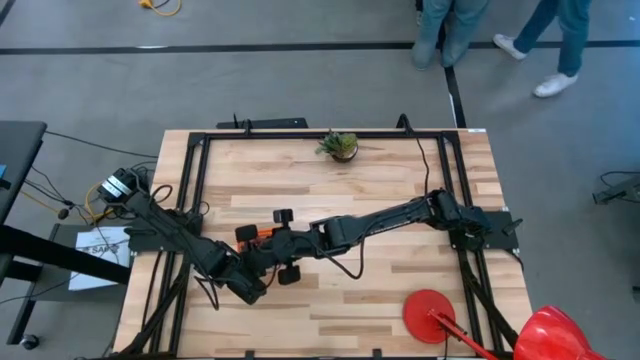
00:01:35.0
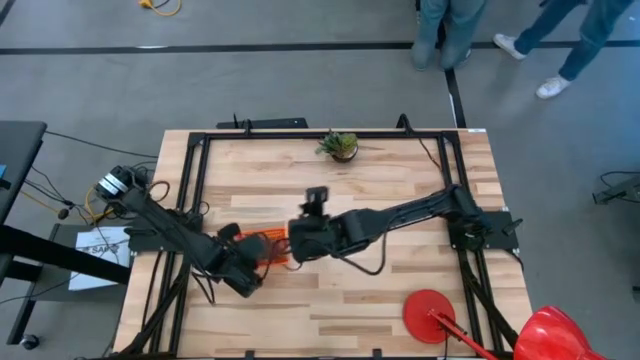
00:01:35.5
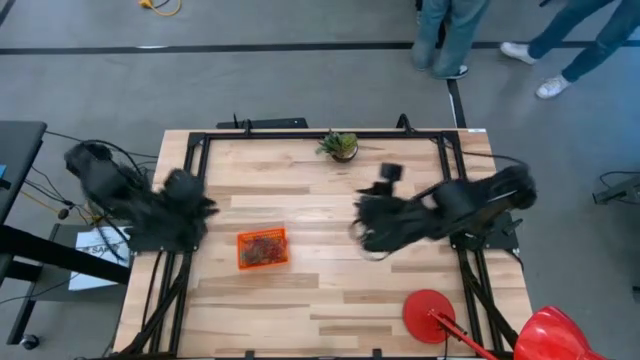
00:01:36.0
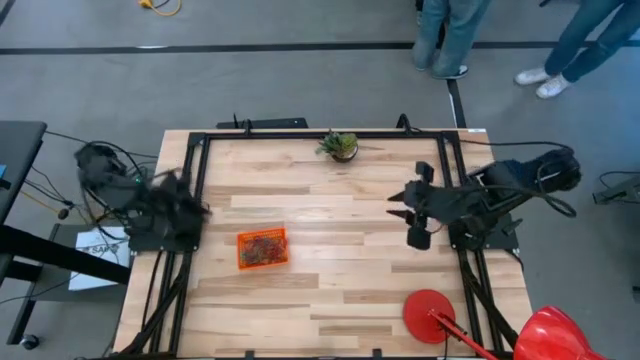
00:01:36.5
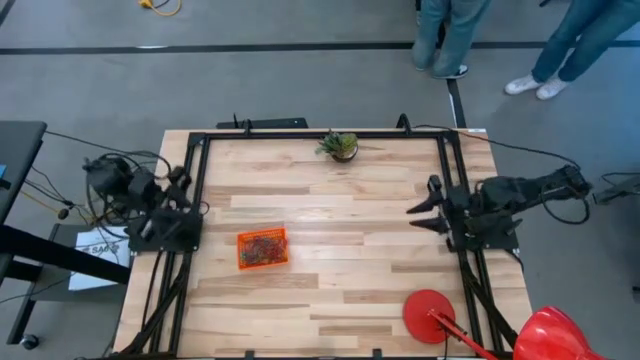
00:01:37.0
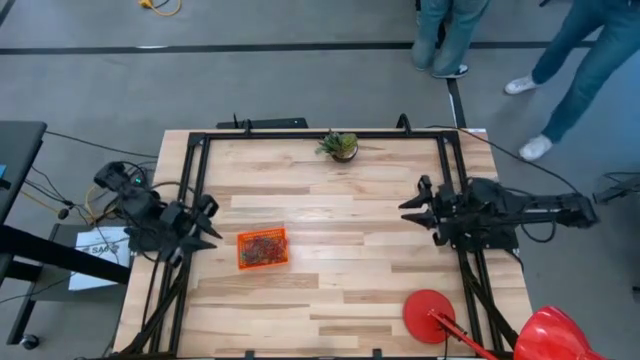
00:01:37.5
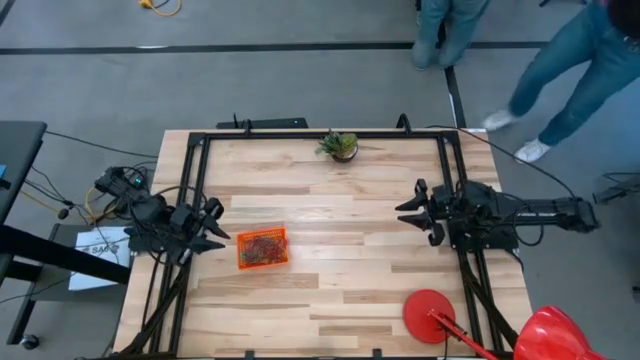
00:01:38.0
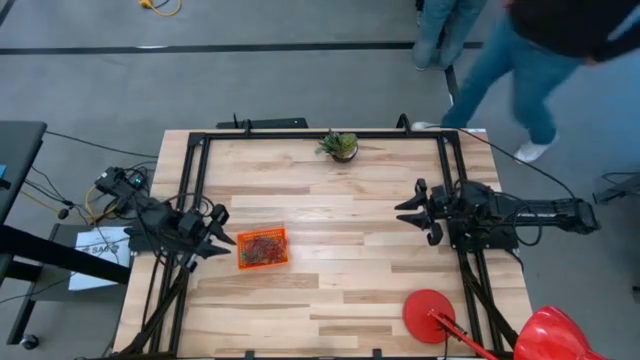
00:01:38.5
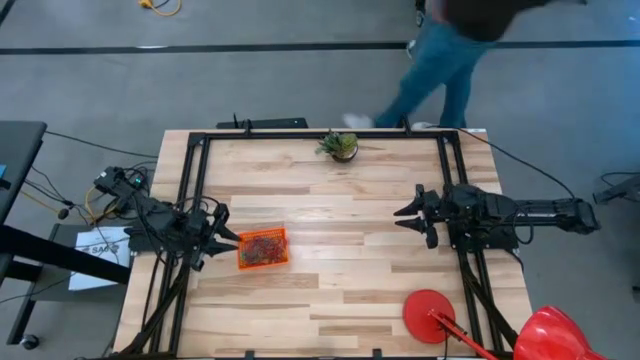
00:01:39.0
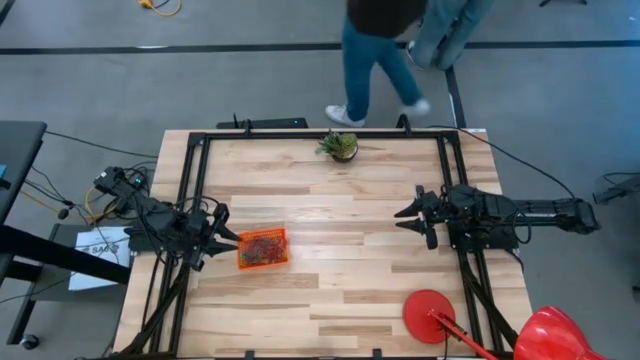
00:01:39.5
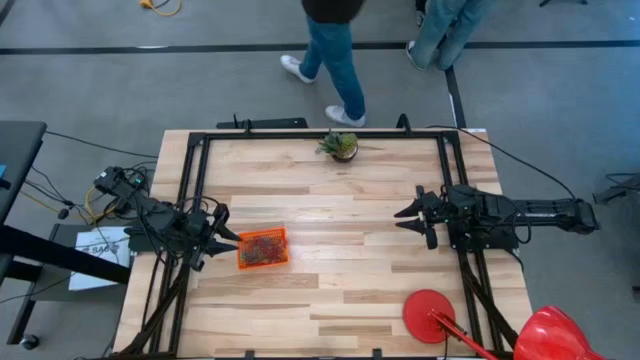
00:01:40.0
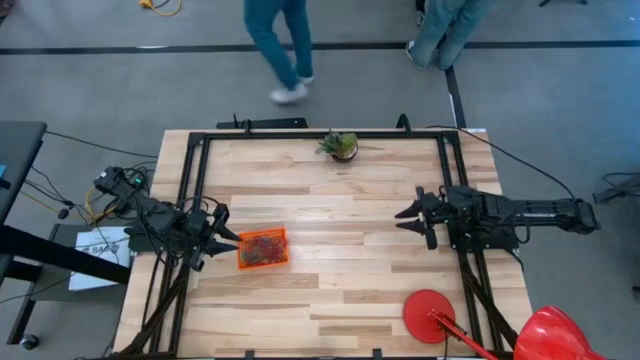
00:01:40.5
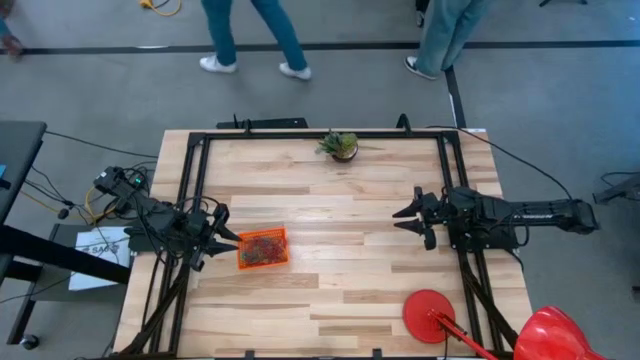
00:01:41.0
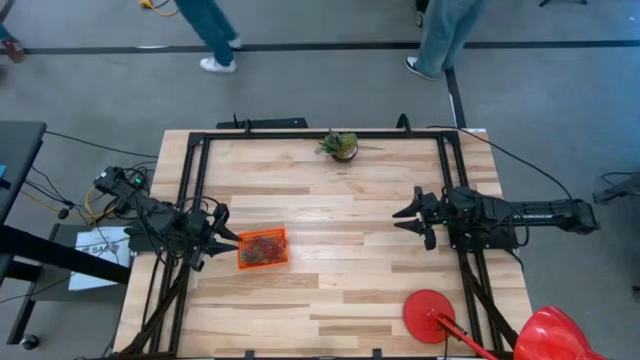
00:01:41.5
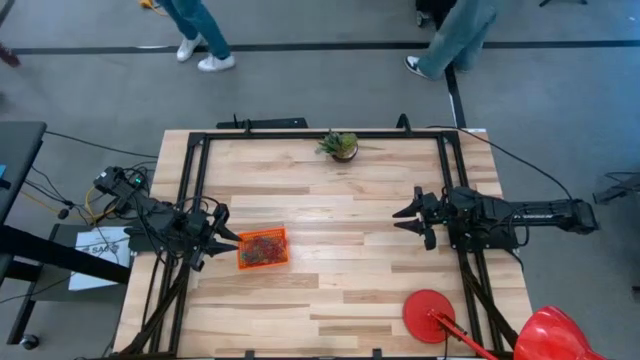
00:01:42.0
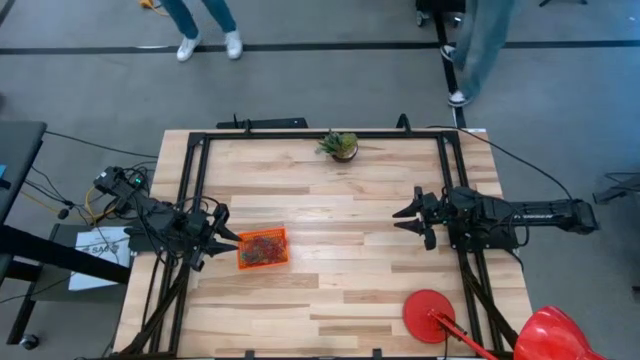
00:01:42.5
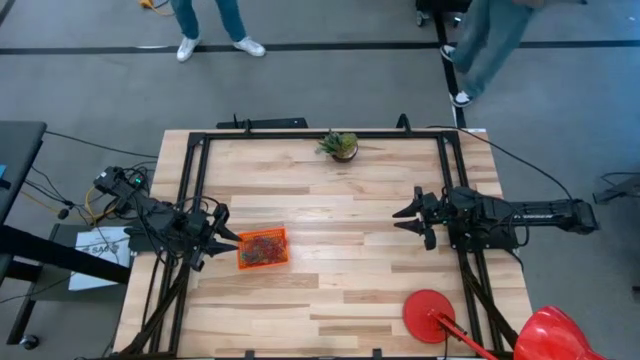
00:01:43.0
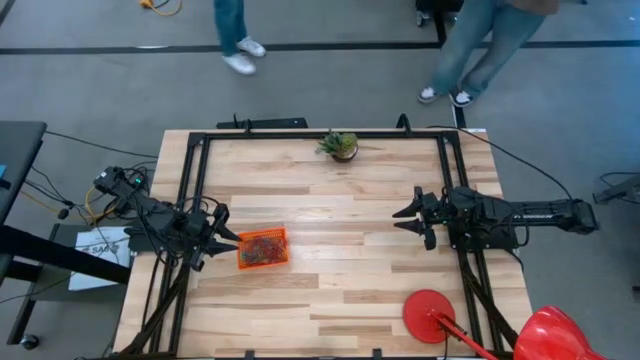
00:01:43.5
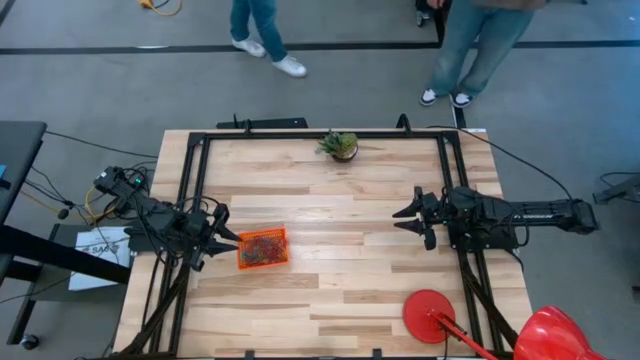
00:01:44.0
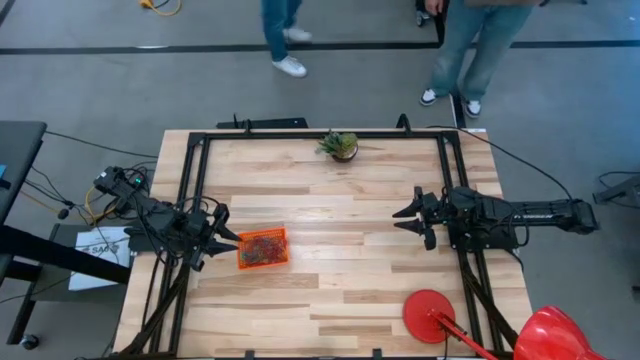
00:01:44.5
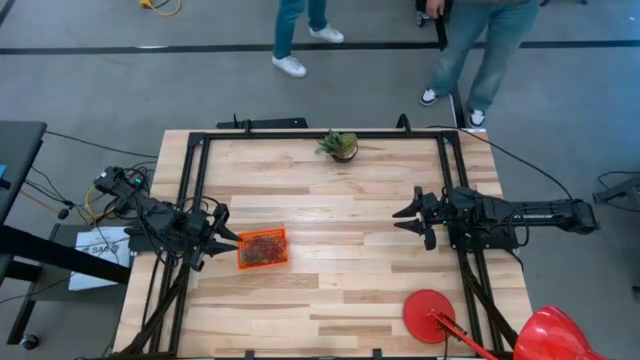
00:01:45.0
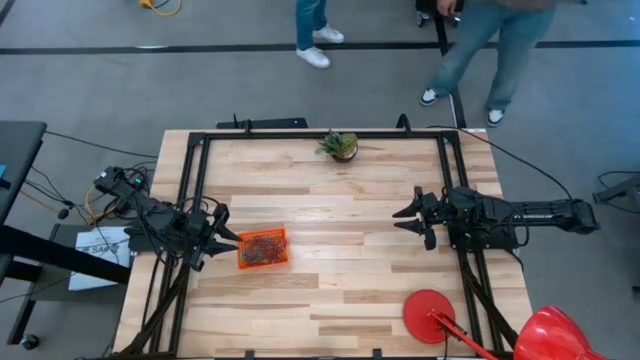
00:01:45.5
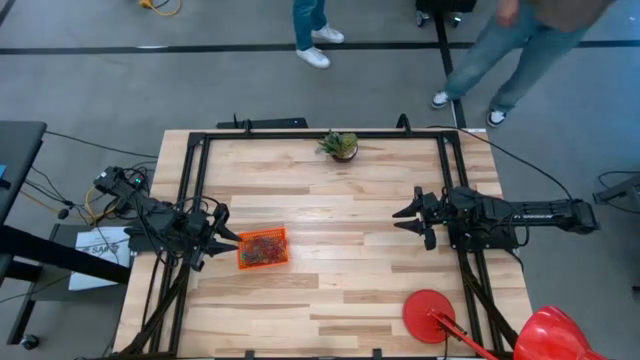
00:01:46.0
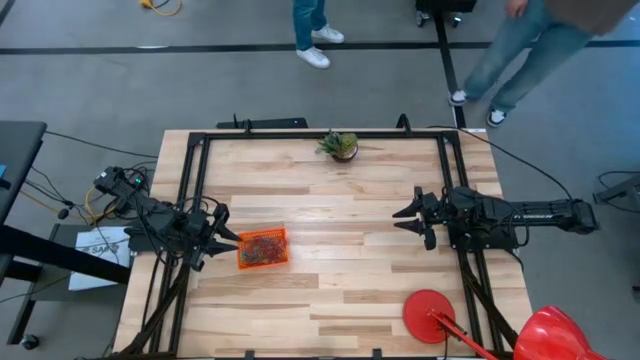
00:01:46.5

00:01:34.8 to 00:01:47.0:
Task: Pick and place rubber bands into bin
Return to Home Position

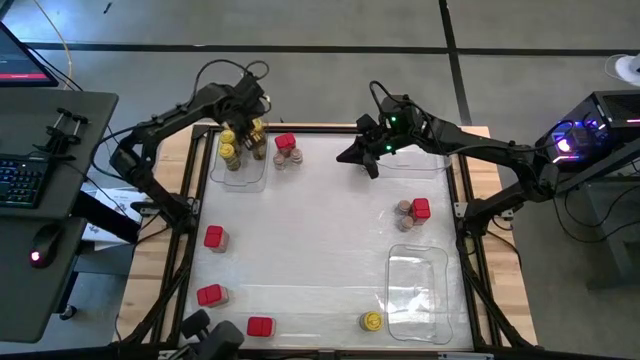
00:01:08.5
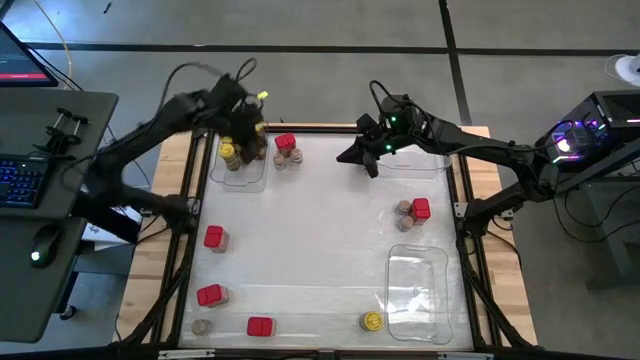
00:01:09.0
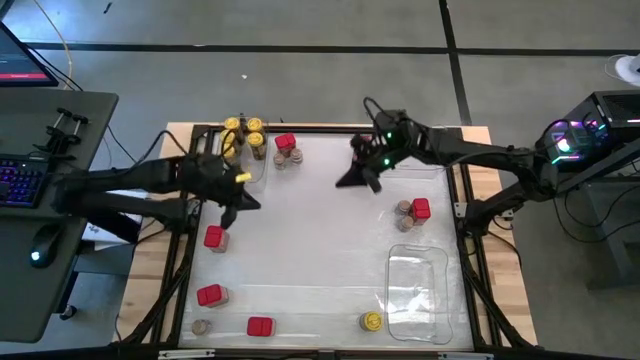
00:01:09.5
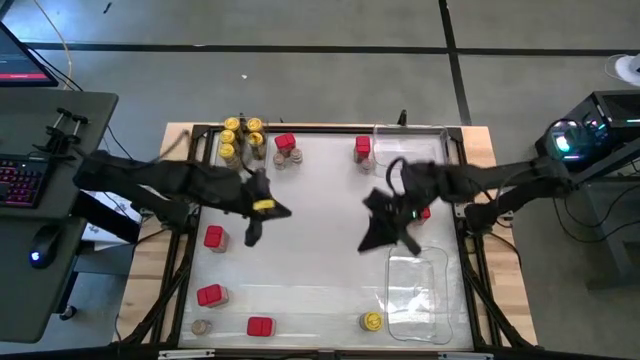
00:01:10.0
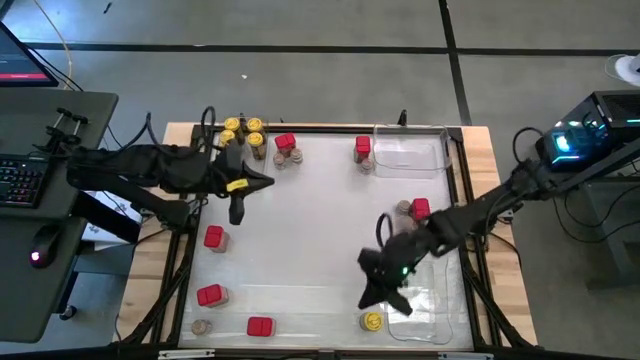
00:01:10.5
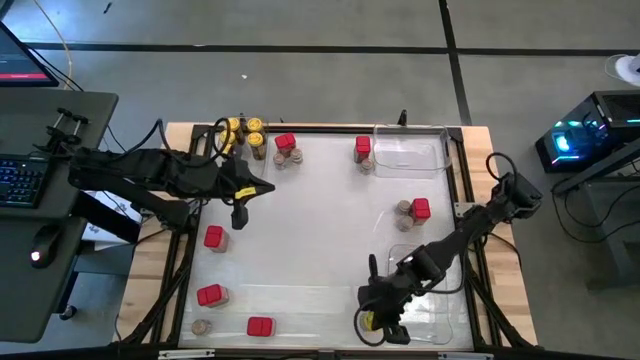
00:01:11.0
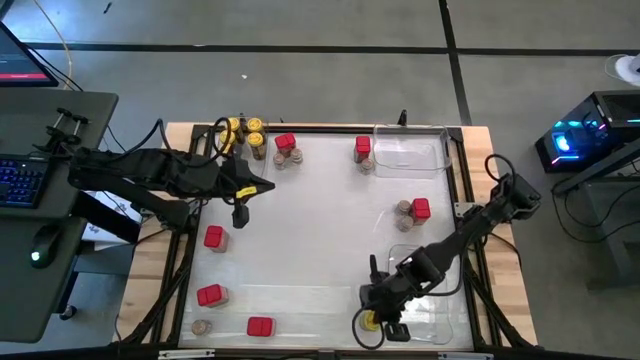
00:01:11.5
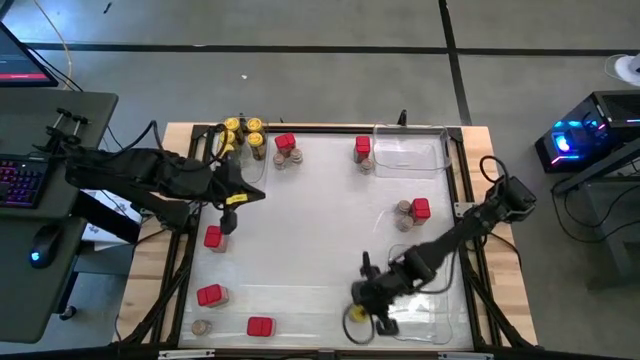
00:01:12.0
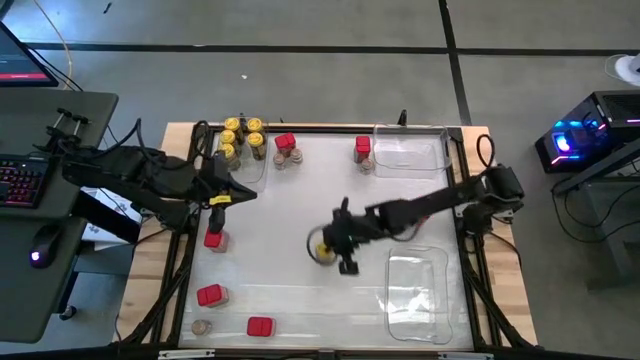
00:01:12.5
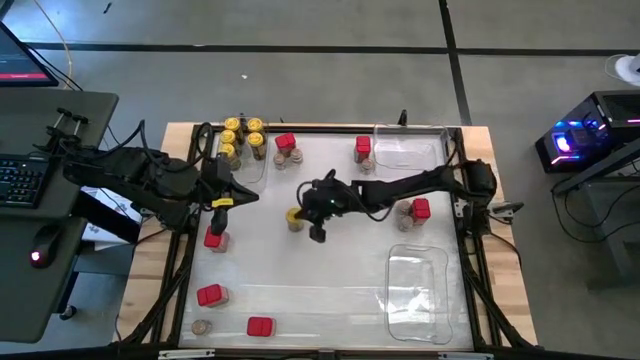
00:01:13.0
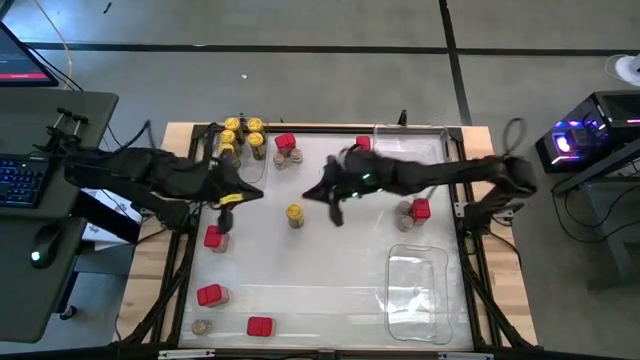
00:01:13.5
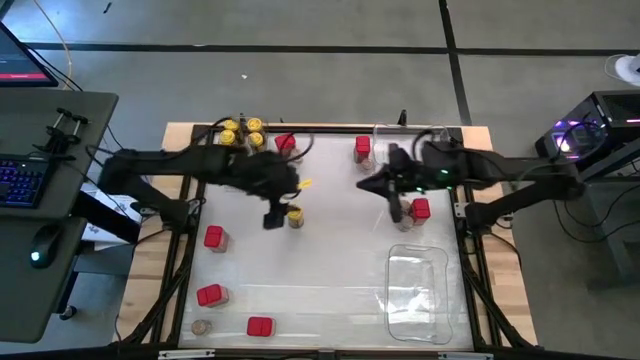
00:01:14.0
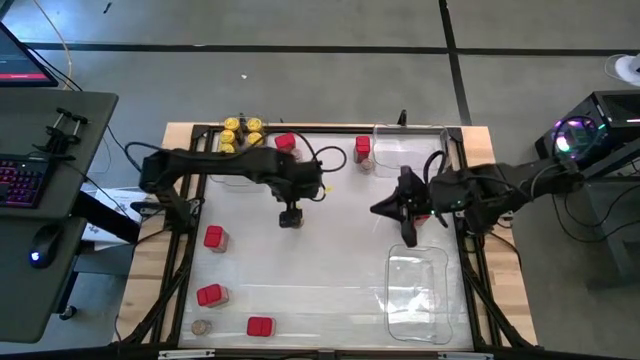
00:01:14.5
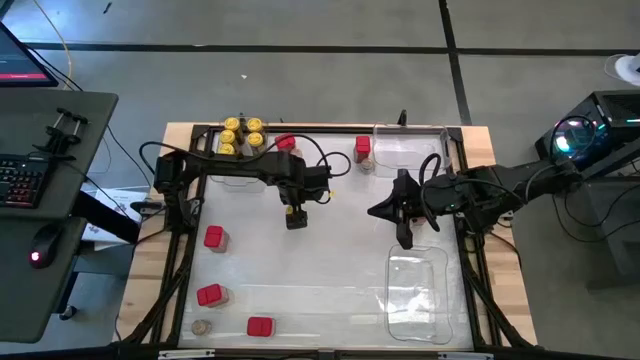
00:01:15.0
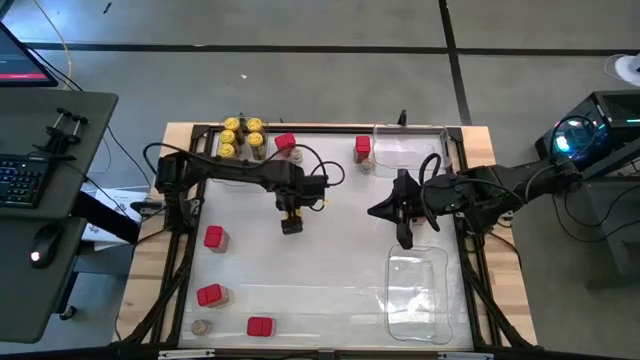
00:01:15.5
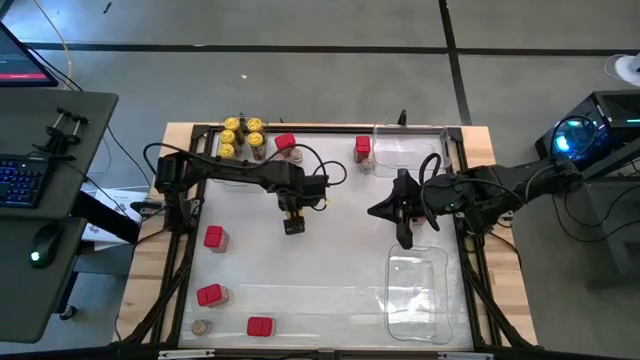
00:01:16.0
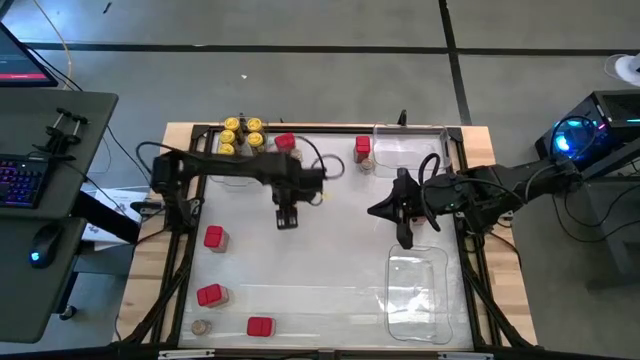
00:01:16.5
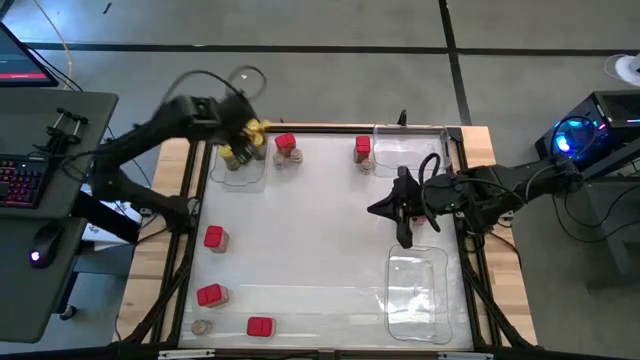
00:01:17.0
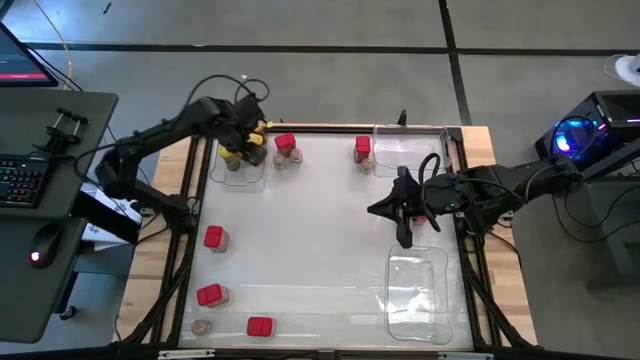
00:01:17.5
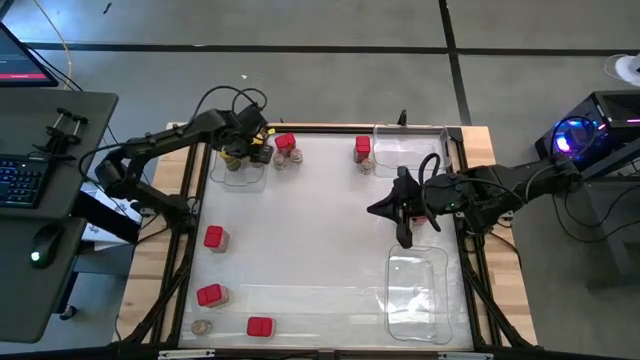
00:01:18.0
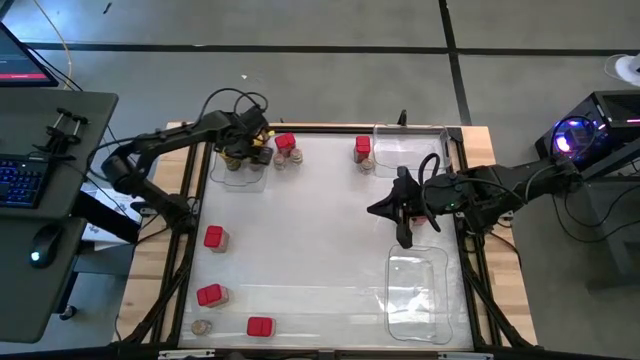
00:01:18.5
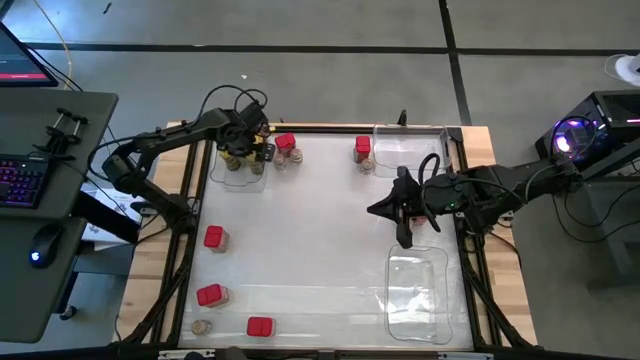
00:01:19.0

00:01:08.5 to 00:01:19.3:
Task: Sort spices by type
Put the yellow seasoning bottle into the top left transparent bin
